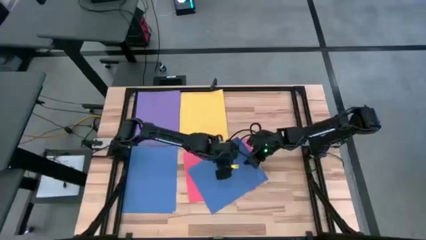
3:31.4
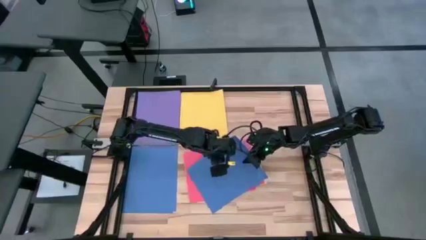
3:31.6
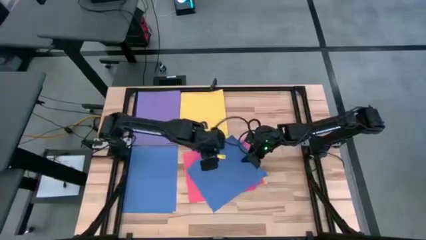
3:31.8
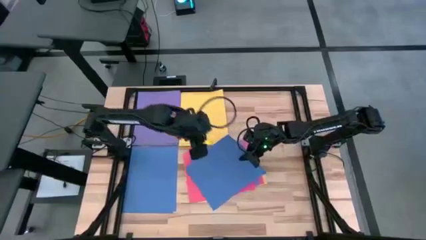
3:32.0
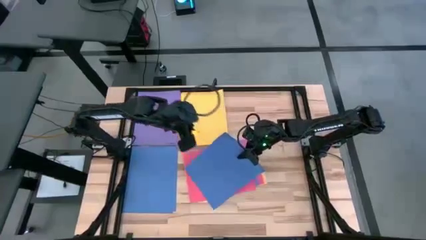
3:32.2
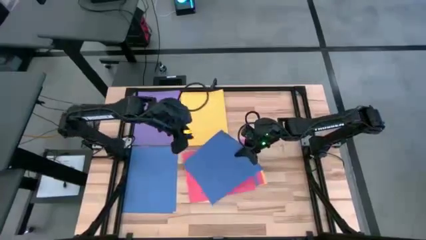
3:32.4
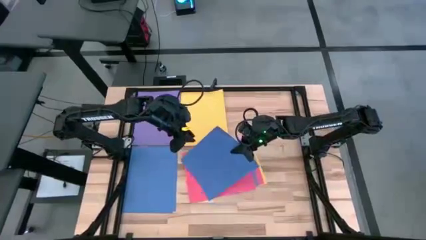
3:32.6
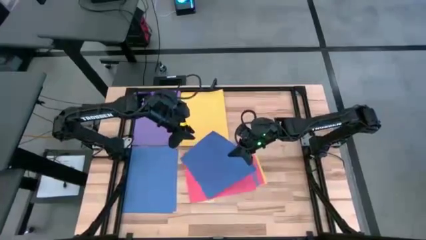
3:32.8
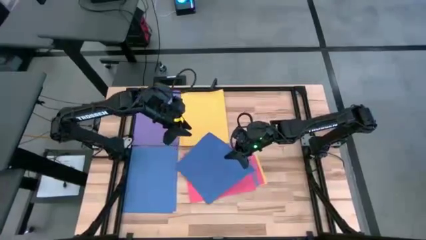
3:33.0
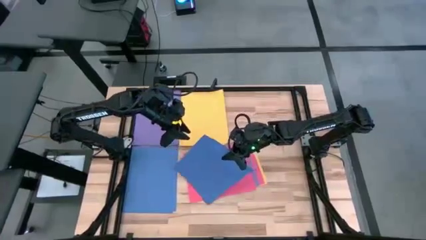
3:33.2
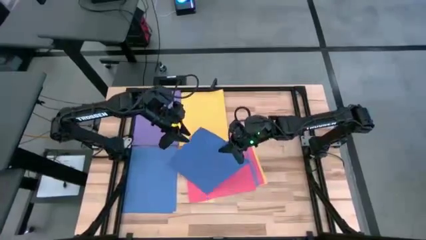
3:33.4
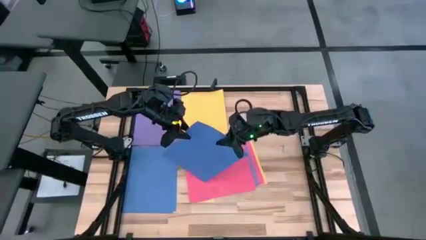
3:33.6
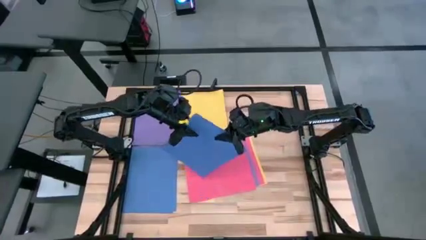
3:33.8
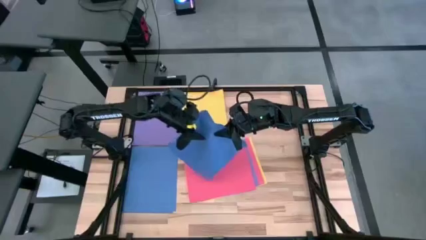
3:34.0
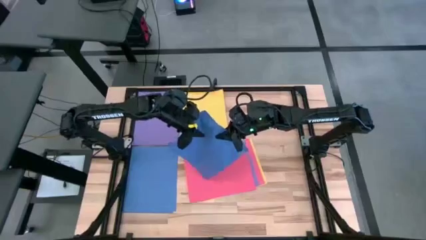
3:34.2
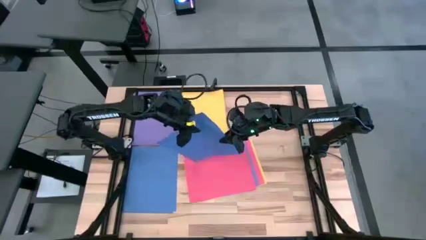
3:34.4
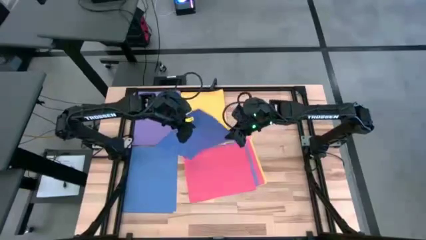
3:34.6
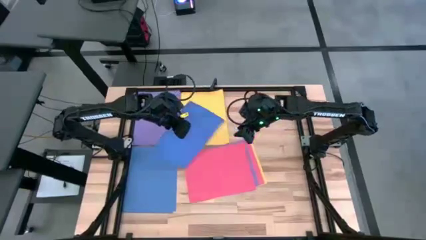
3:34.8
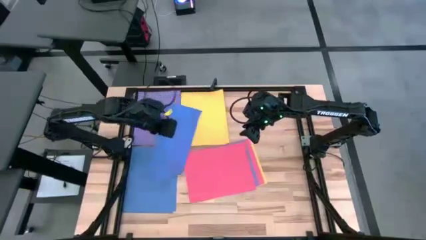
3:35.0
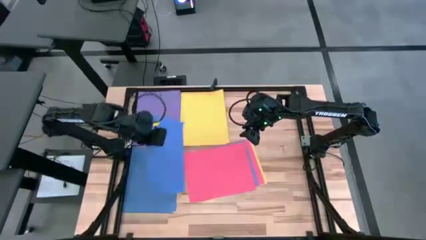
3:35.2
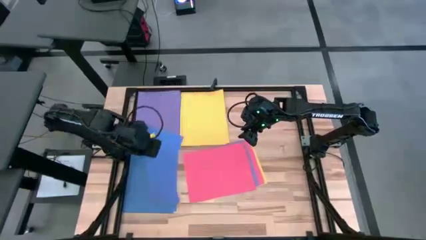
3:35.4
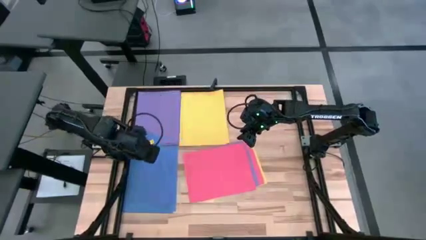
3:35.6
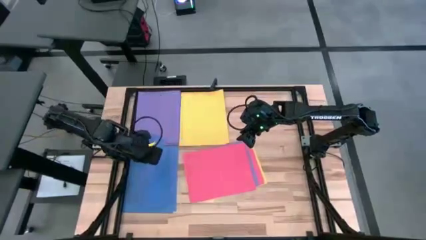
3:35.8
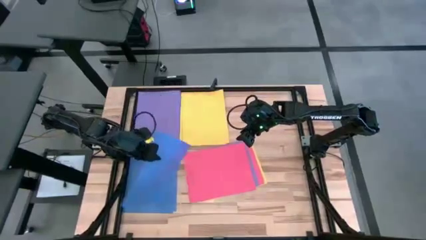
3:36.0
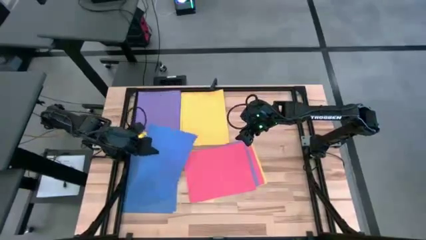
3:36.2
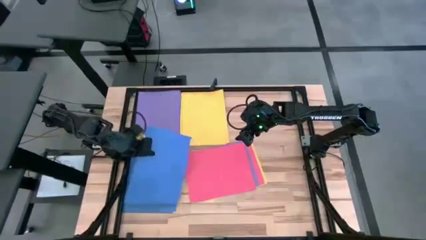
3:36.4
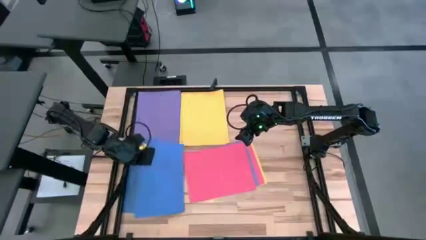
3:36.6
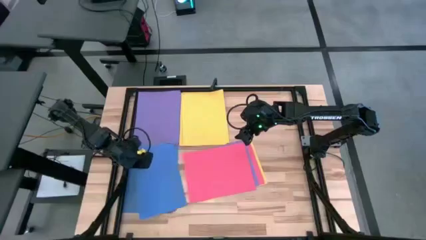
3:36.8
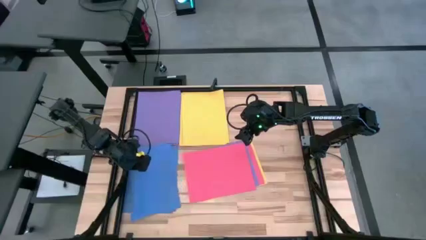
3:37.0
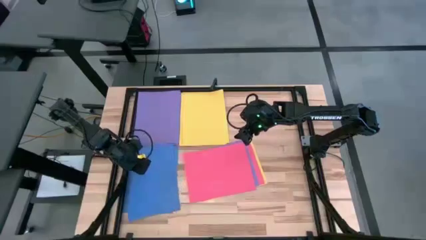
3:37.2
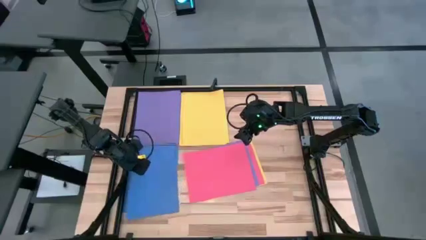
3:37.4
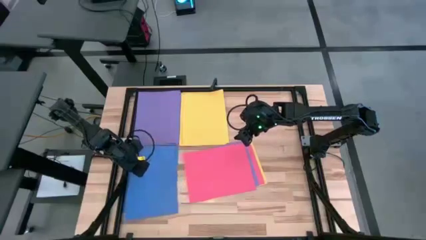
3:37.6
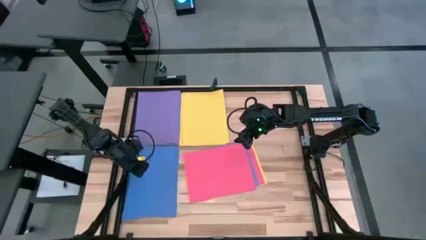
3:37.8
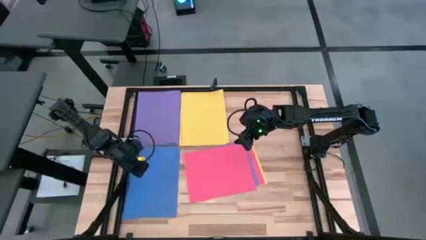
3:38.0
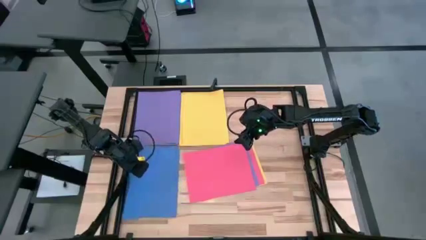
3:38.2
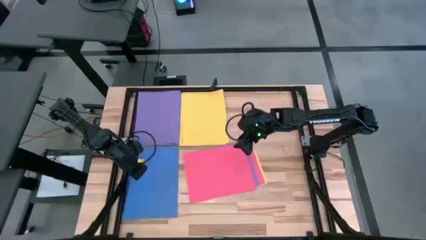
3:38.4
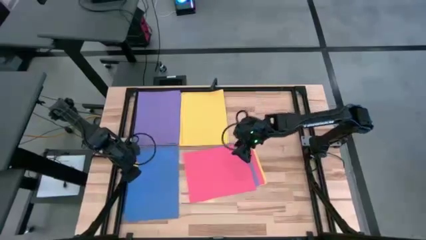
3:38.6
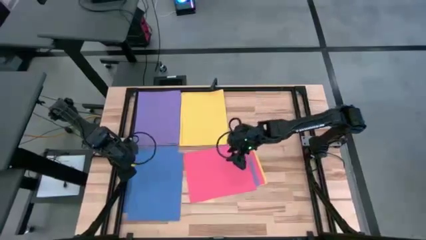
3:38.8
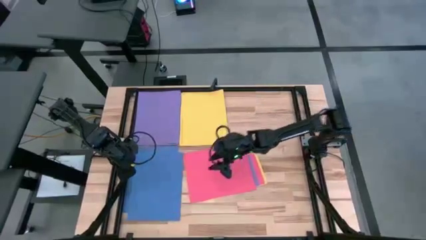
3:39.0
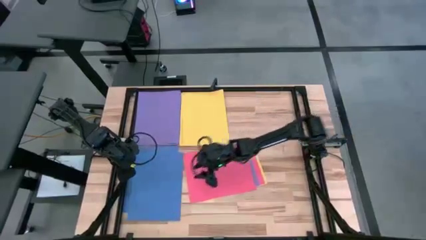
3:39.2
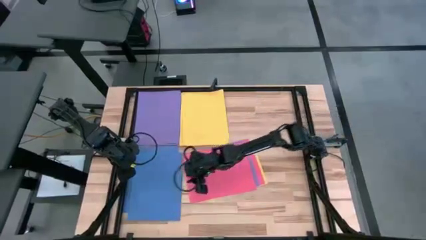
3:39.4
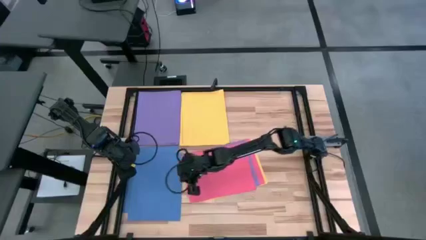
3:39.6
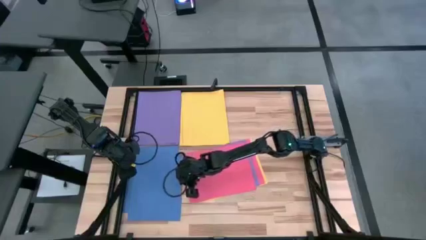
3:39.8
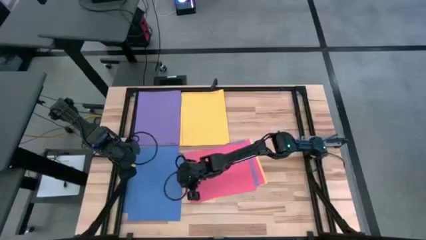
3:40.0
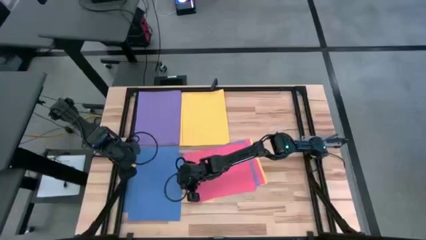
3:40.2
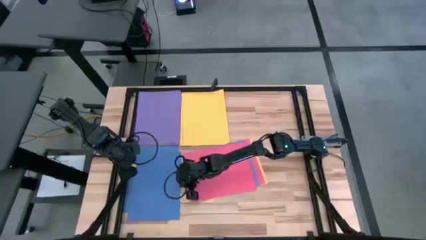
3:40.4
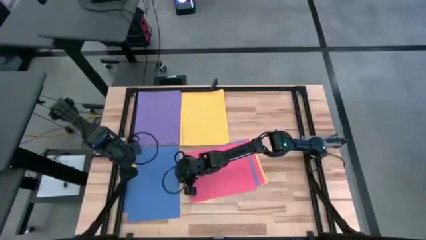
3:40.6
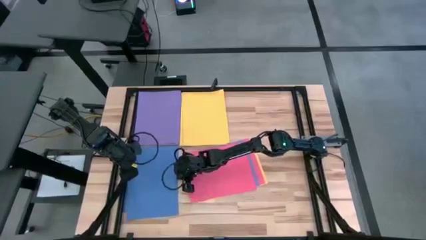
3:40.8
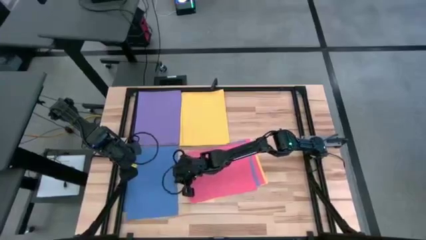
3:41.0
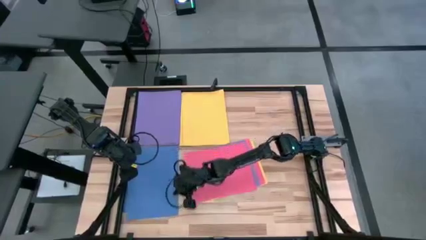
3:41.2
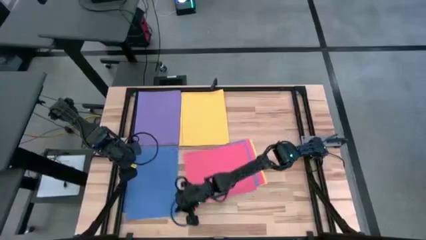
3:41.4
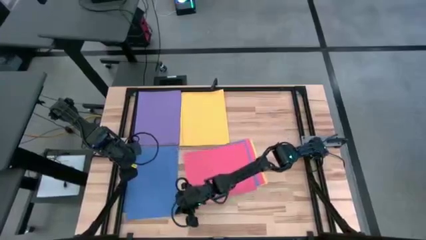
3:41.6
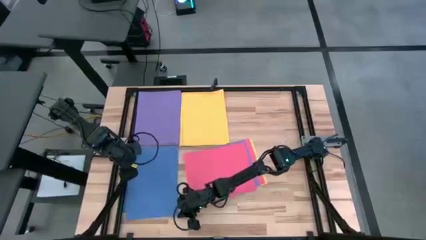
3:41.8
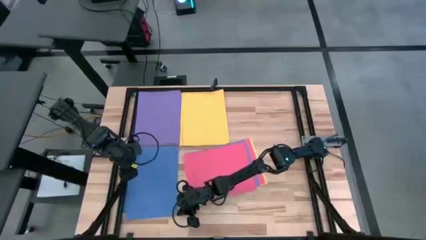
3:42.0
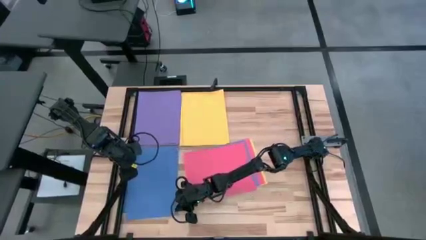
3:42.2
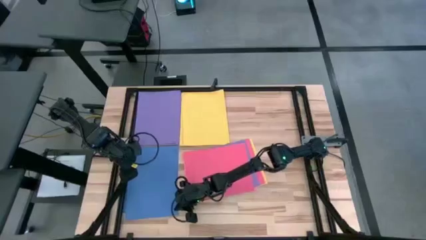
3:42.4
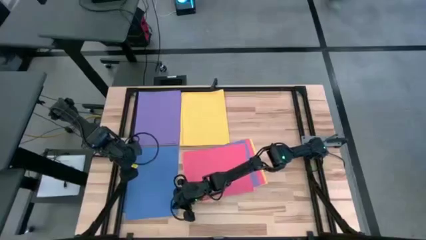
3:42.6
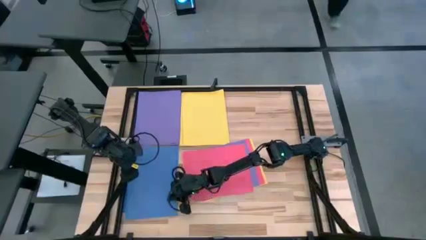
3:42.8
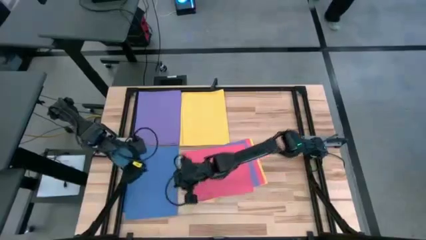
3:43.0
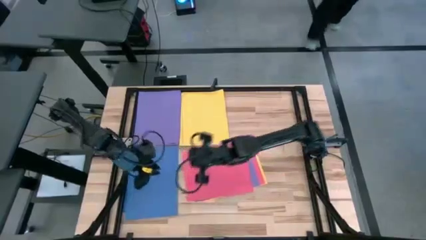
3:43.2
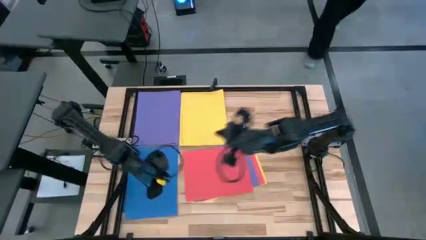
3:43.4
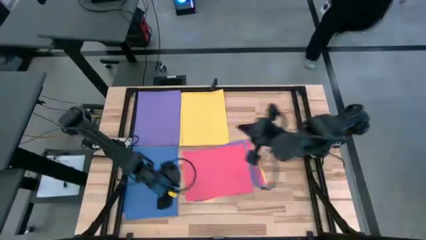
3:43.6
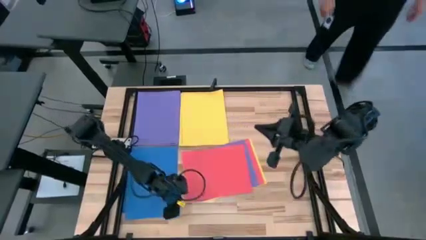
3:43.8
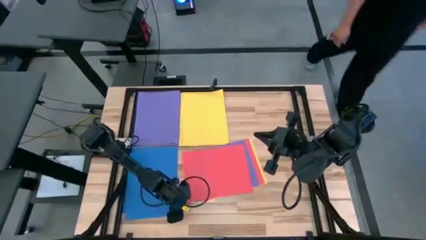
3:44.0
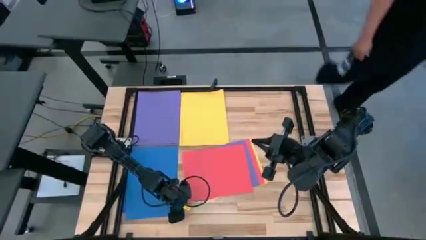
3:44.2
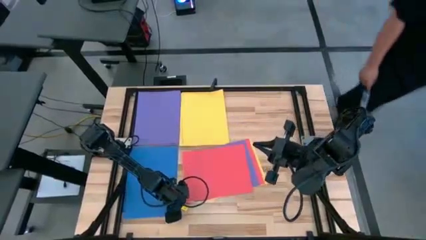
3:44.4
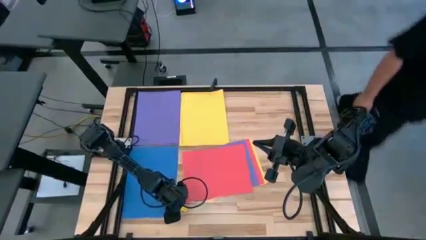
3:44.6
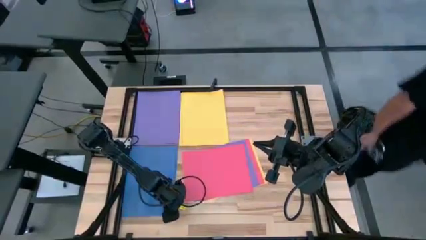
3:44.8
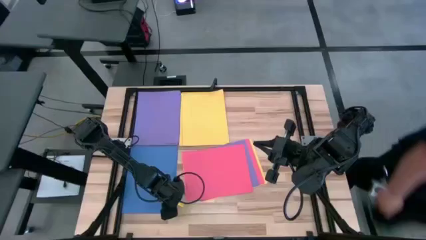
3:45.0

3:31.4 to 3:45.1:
Task: Organize paper
Stack the blue paper on top of the blue paper

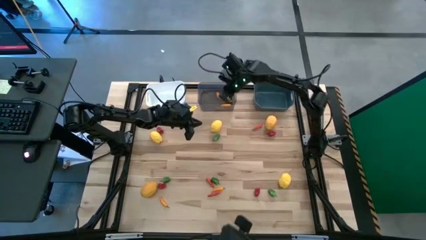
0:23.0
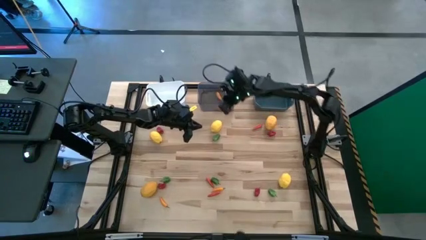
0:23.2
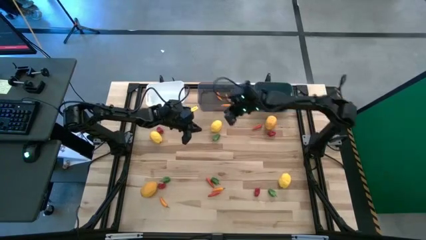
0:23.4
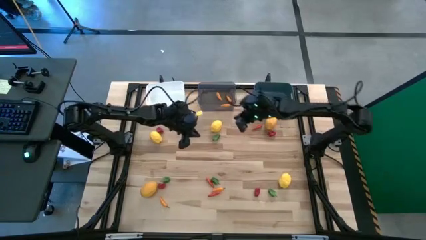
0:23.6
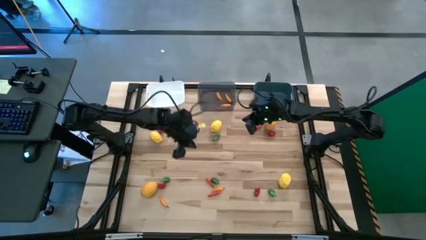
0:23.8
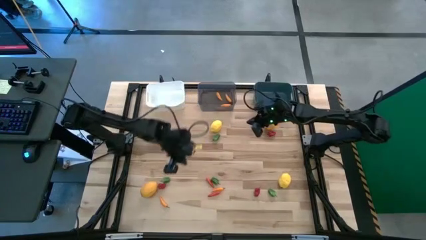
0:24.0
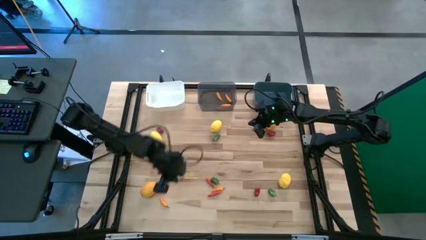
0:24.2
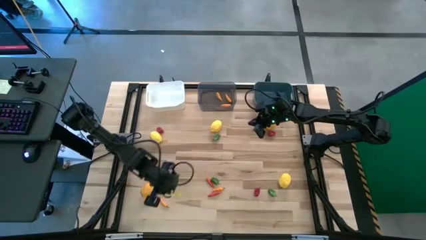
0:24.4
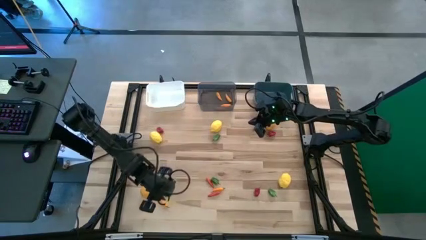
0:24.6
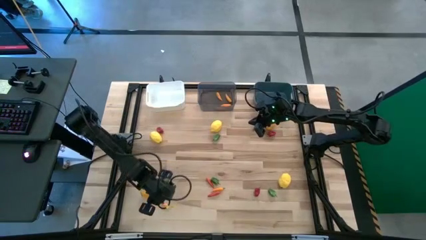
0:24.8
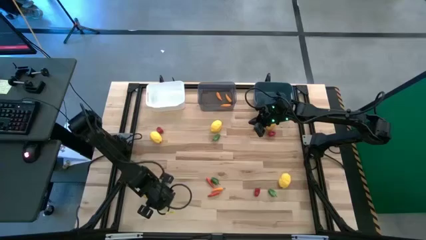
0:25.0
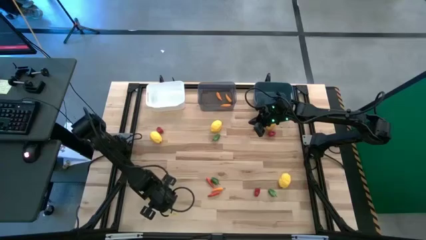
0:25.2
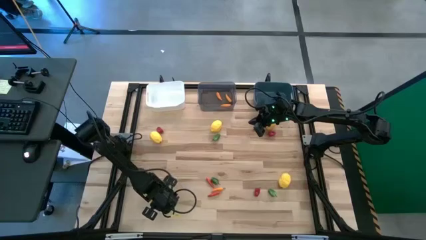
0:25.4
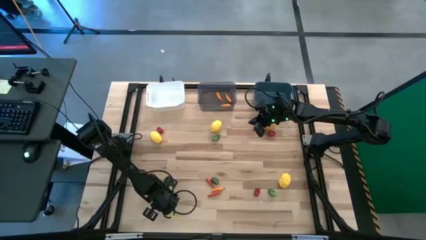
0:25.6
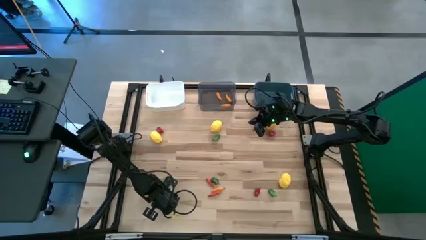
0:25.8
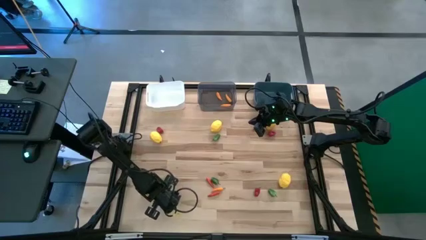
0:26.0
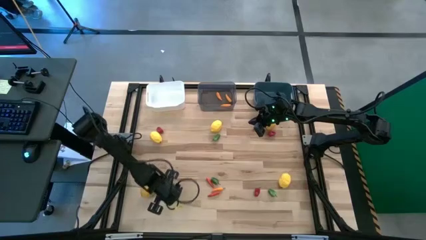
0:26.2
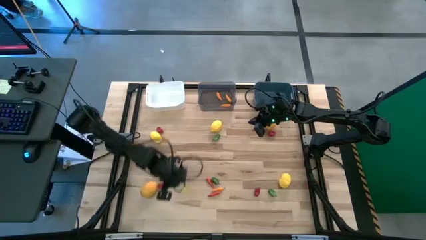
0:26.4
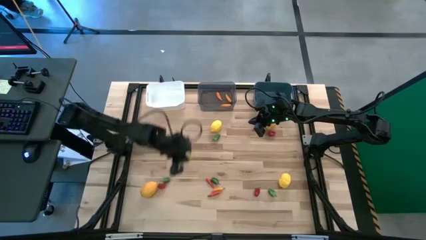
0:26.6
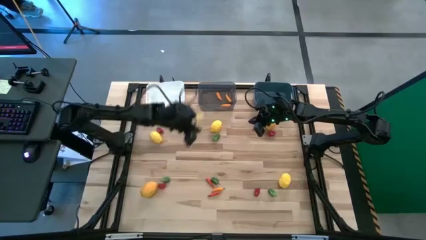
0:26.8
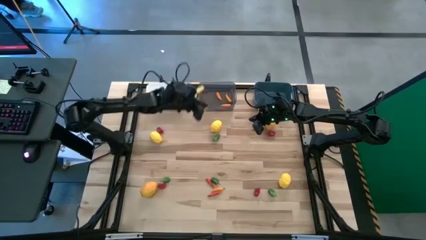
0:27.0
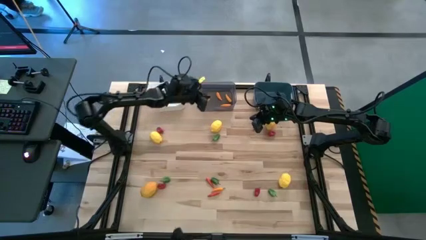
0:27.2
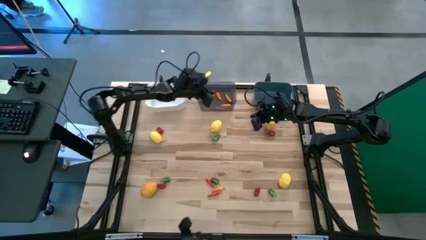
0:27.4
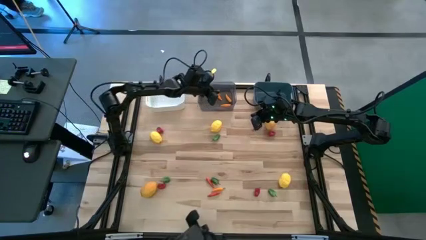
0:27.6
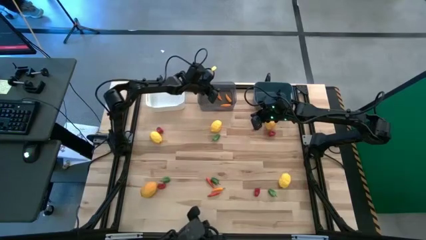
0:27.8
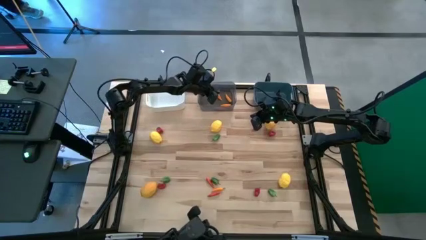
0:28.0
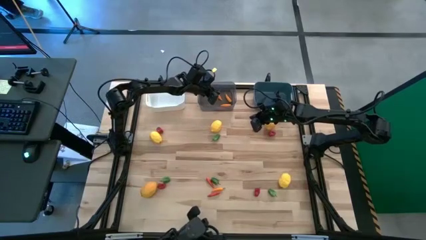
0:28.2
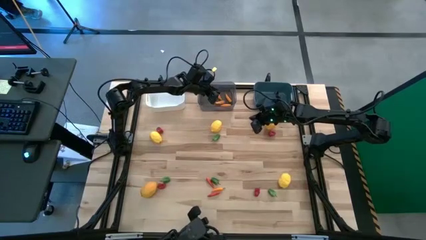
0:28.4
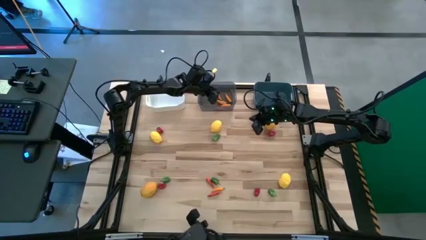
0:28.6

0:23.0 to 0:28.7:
Task: Sort produce into baskets
Put the top left yellow chili pepper into the black bin
